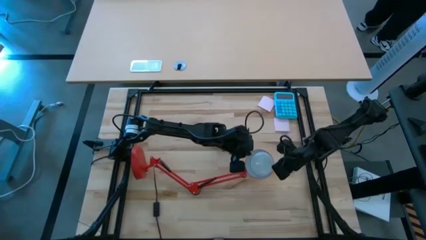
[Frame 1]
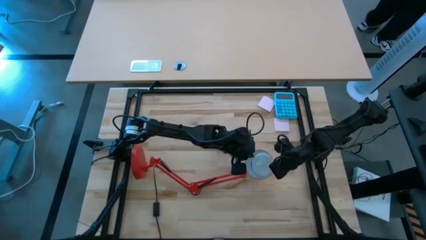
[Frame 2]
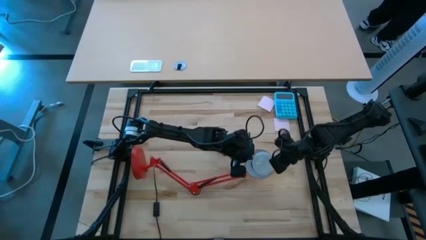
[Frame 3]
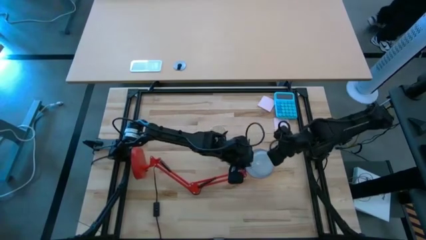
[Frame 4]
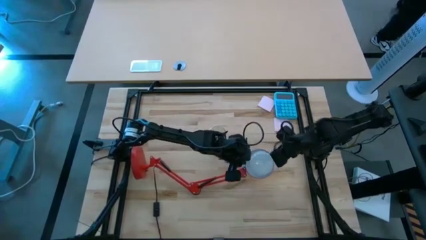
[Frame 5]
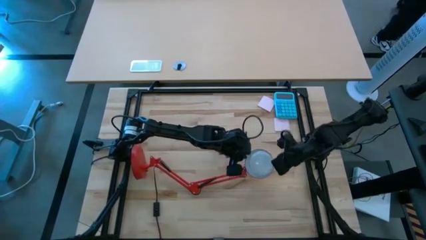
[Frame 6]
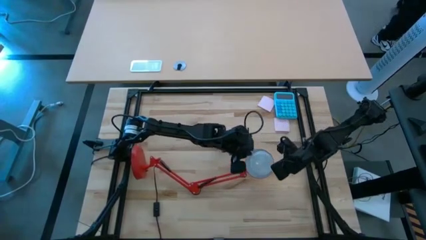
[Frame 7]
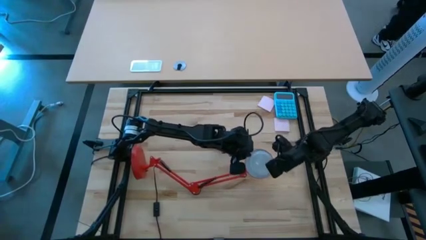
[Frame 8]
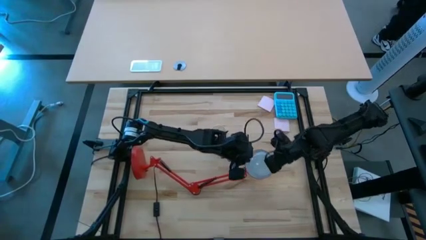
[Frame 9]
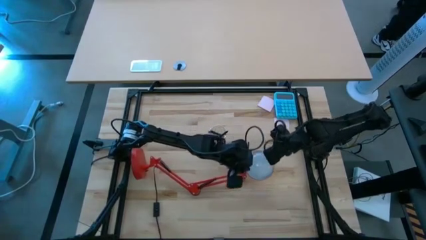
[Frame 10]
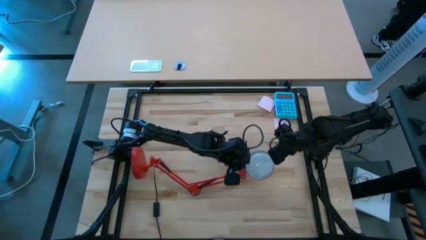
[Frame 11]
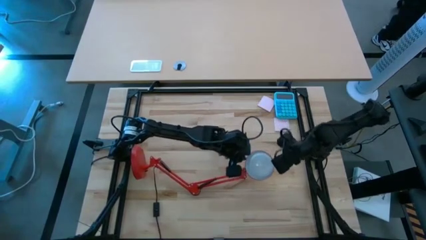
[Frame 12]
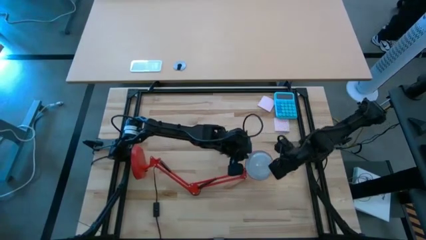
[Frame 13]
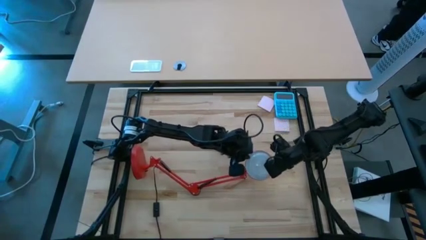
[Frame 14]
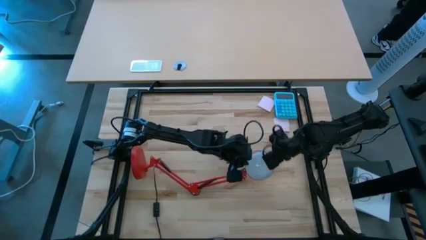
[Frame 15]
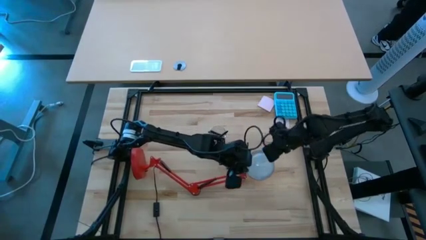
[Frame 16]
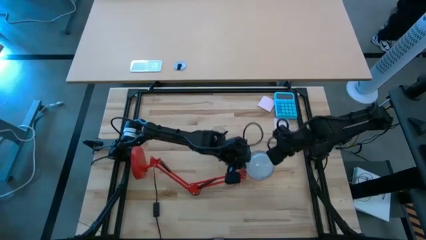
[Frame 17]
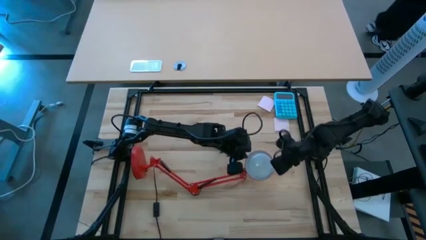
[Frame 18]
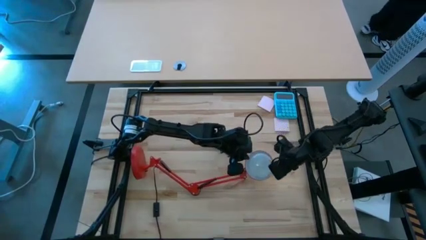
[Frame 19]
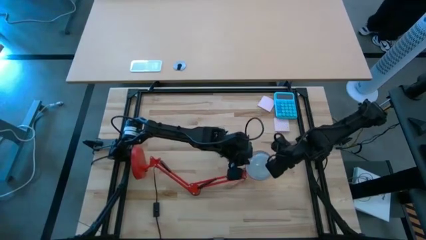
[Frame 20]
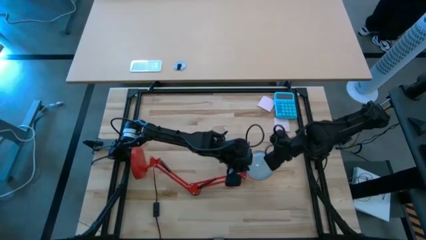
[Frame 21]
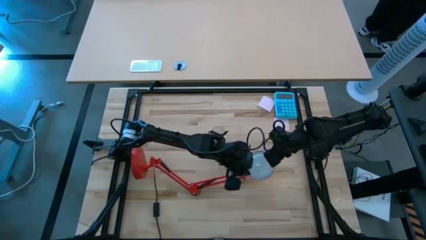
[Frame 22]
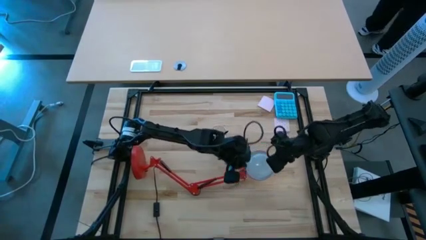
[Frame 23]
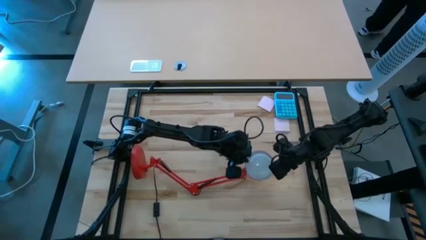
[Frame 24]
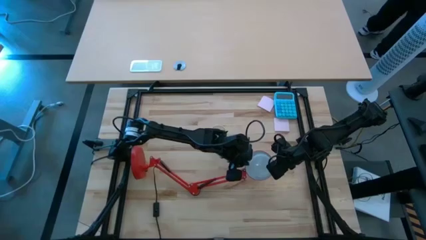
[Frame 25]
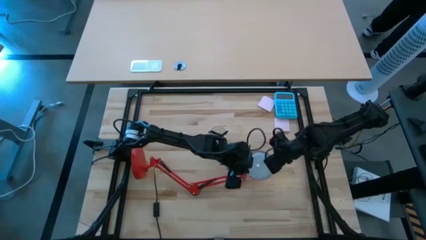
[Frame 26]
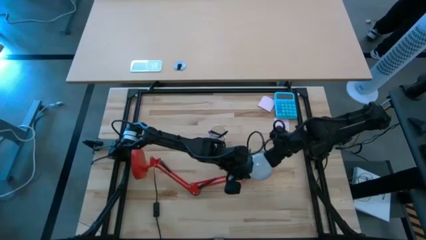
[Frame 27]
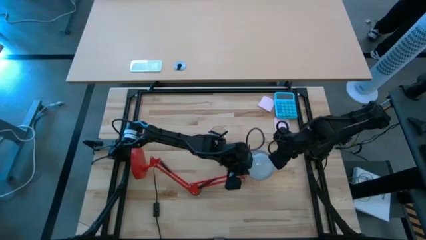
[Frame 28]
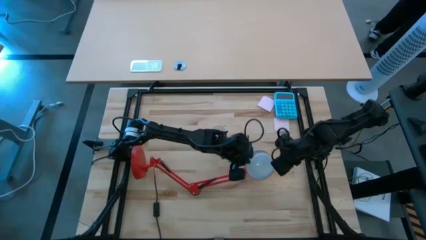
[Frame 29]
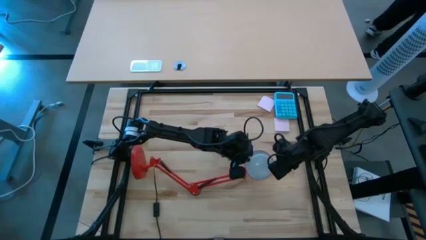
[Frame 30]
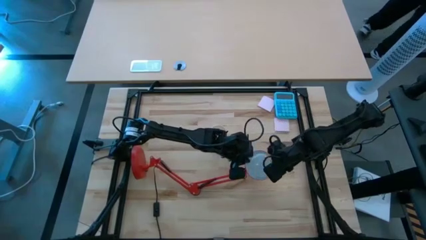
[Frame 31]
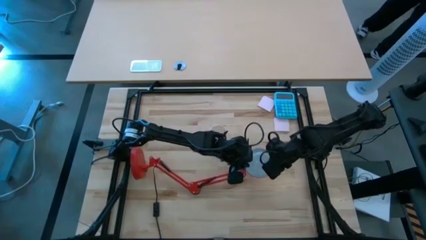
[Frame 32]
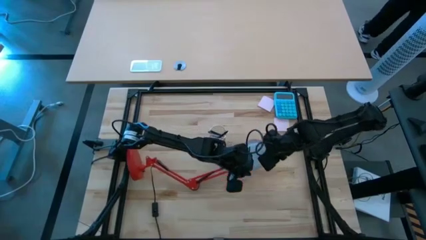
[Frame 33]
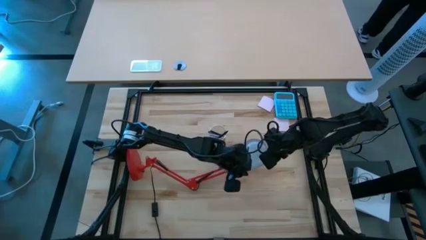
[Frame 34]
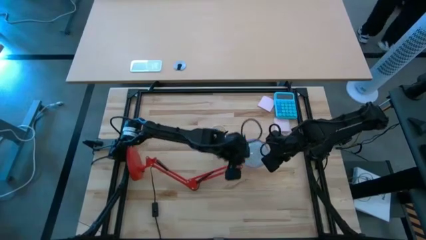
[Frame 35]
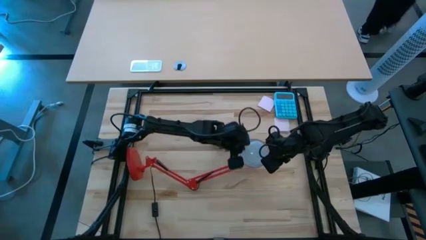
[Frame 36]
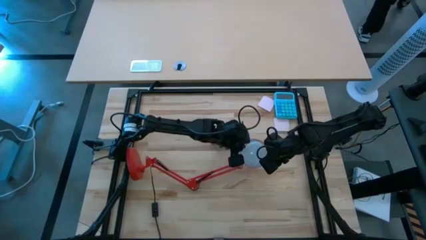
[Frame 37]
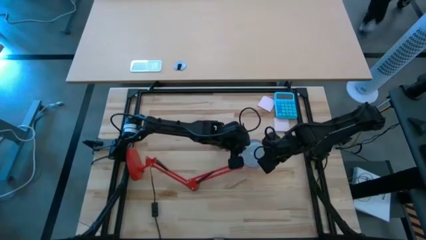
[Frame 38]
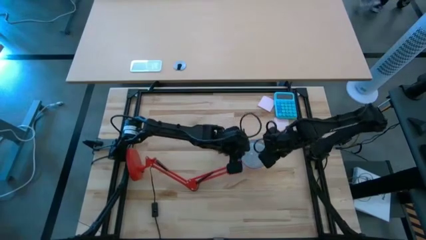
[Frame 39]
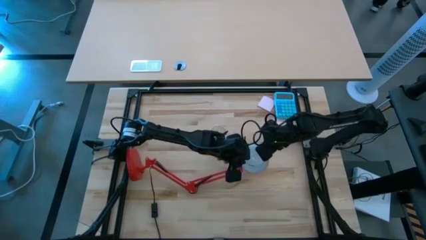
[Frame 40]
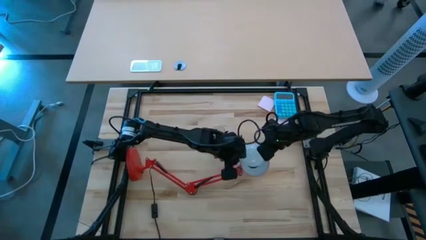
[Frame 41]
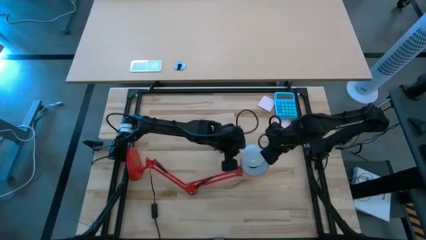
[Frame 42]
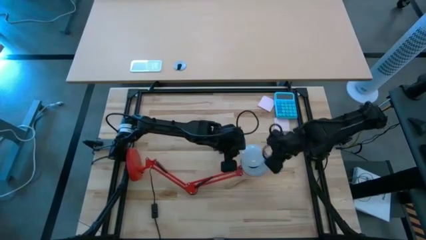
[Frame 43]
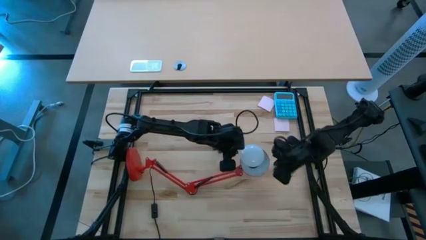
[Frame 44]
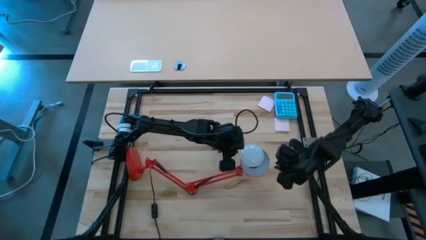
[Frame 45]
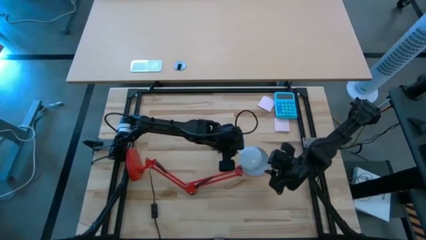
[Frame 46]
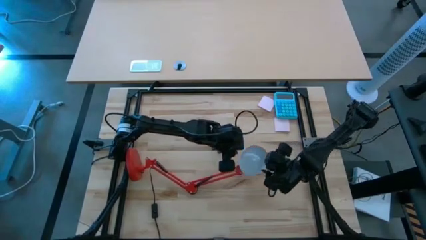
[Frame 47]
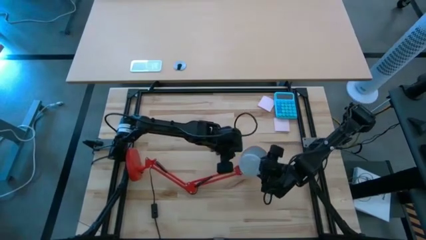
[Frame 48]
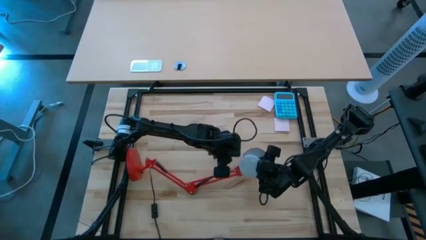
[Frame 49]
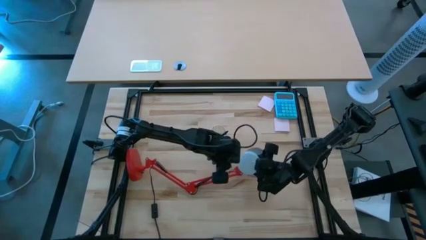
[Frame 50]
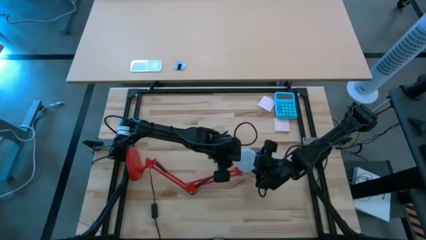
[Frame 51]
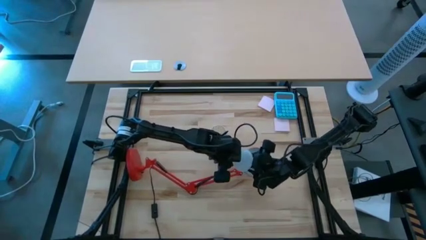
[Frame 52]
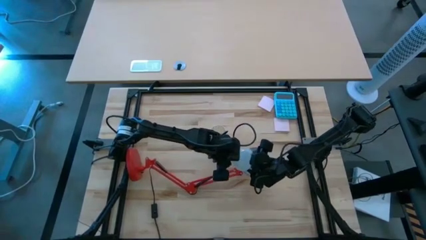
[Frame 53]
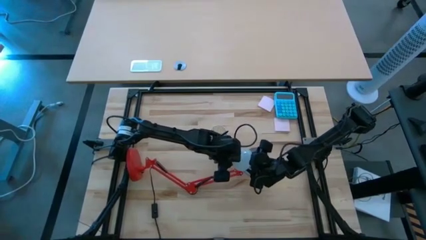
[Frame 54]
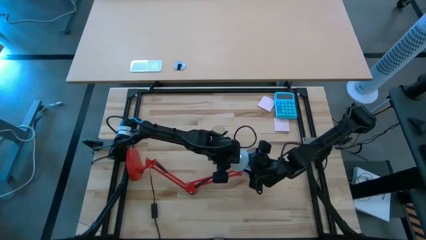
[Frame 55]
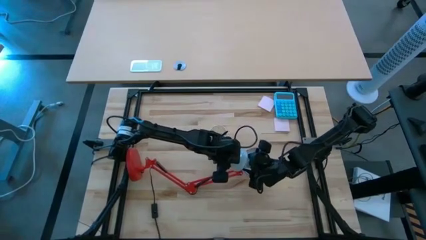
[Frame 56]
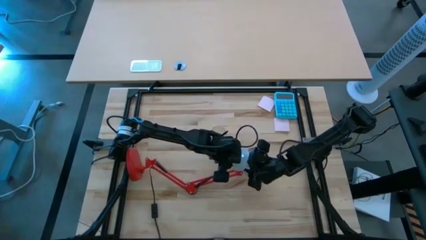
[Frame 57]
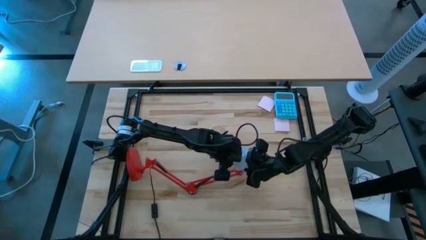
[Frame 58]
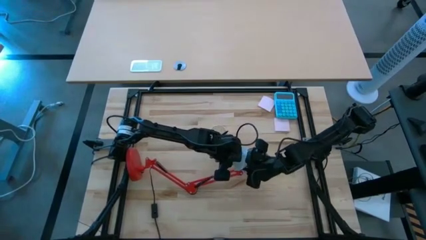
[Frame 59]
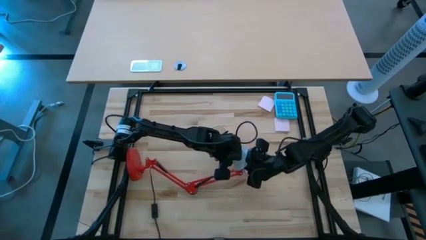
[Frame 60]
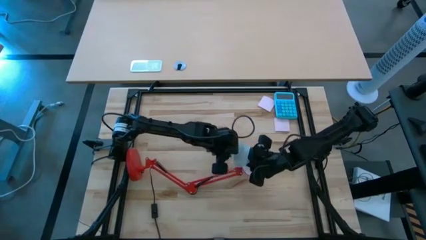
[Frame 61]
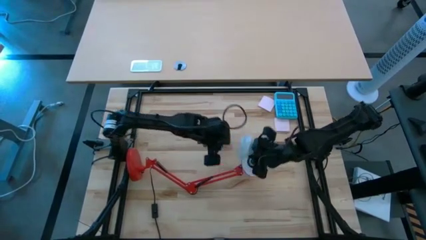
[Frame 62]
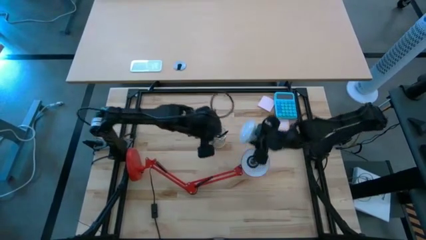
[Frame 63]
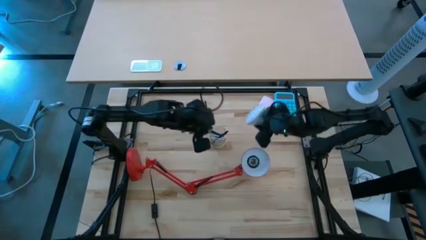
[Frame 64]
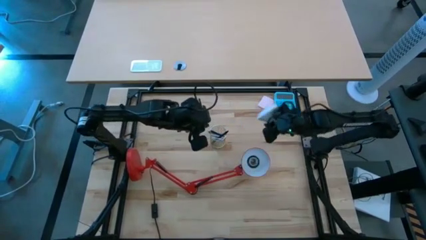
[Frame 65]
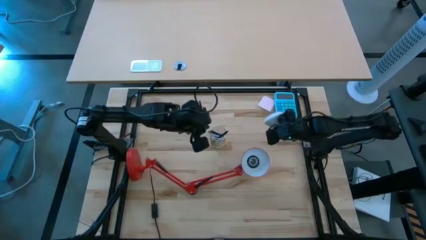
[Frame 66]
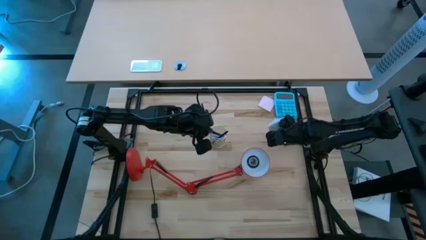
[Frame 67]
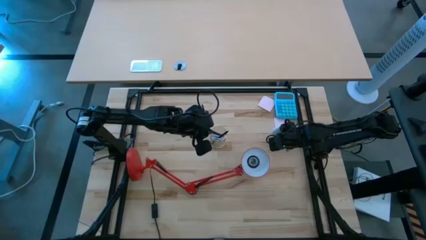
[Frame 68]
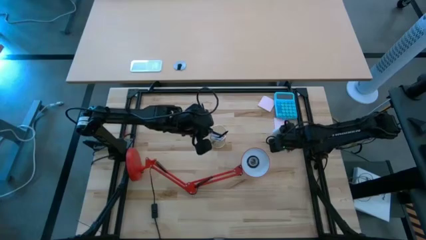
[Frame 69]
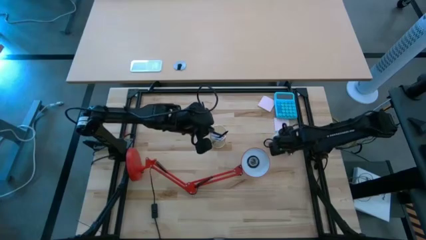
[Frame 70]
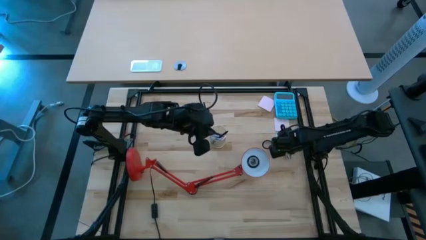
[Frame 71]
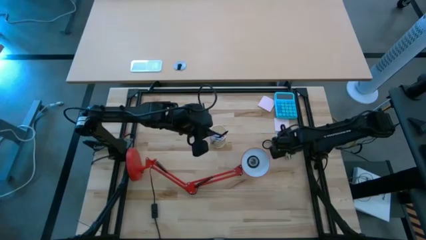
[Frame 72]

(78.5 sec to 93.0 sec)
Task: Screw lightbulb
Remove the light bulb from the lamp

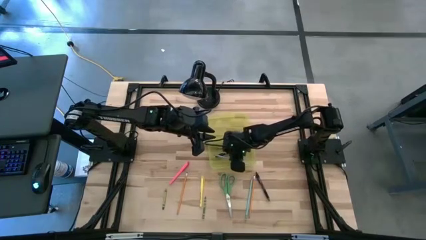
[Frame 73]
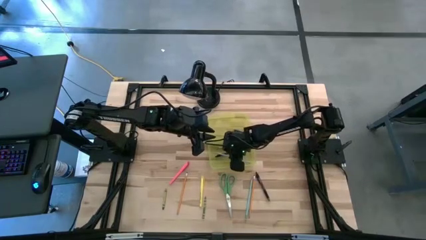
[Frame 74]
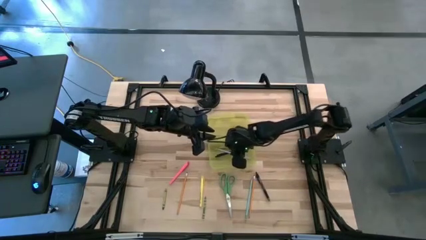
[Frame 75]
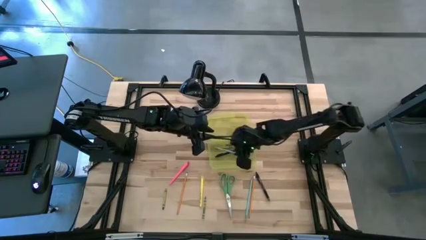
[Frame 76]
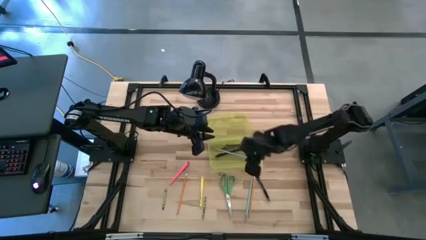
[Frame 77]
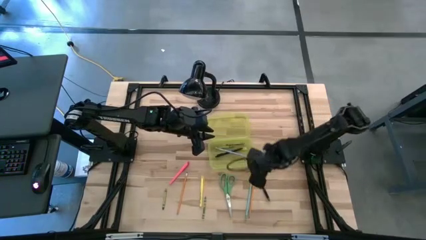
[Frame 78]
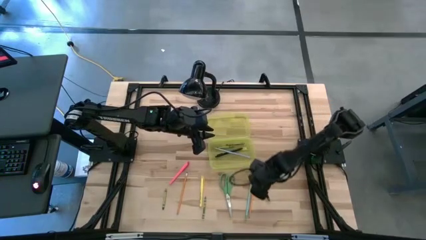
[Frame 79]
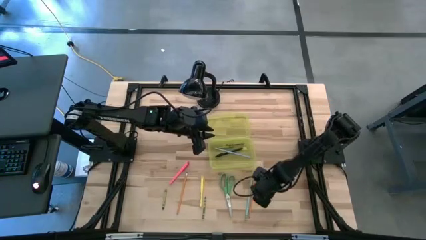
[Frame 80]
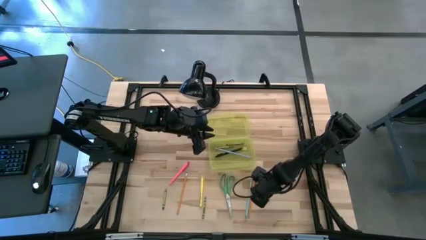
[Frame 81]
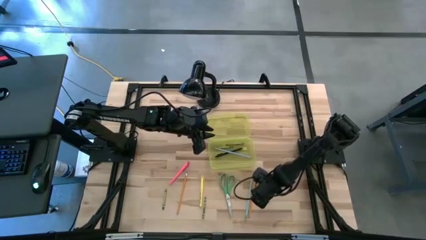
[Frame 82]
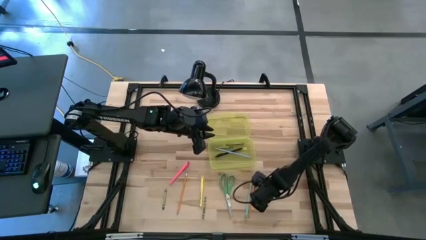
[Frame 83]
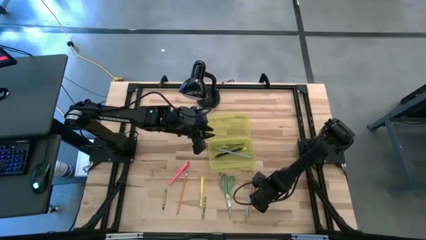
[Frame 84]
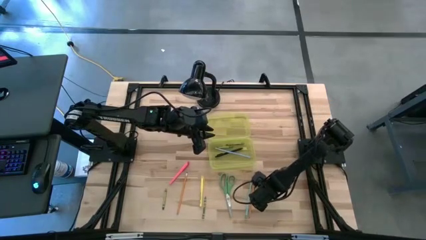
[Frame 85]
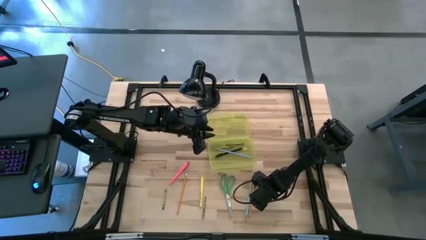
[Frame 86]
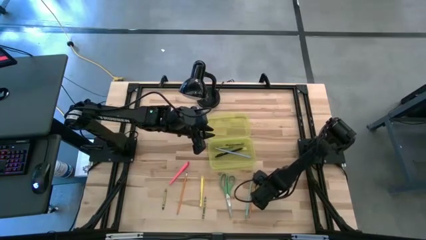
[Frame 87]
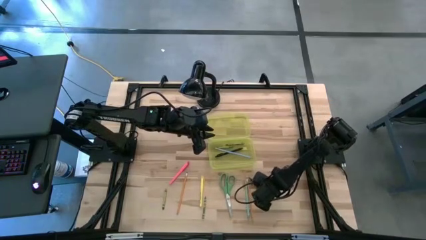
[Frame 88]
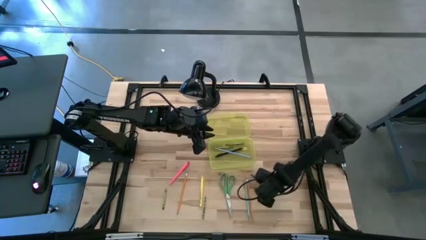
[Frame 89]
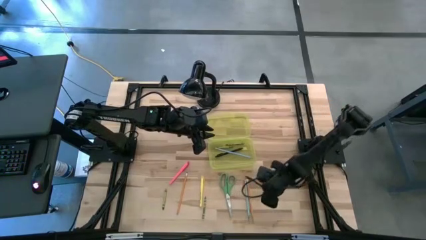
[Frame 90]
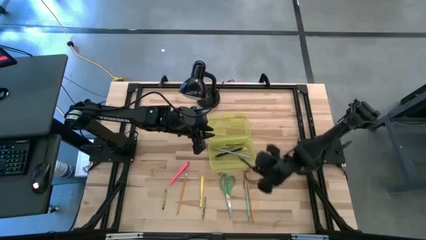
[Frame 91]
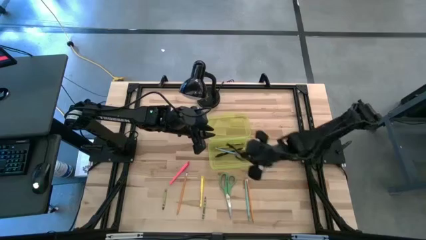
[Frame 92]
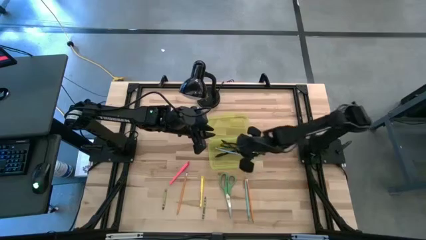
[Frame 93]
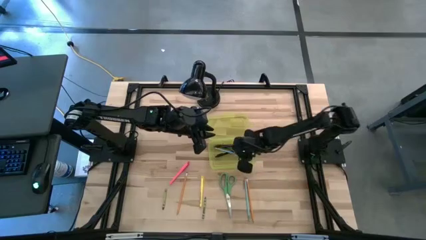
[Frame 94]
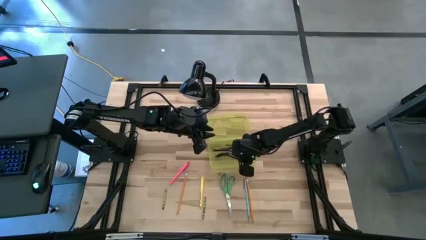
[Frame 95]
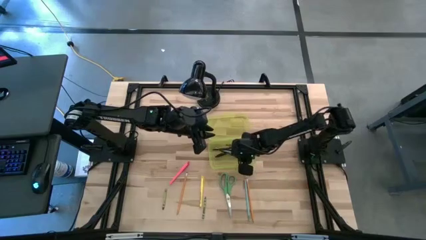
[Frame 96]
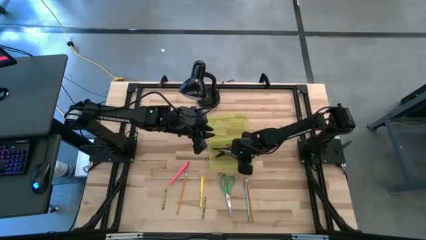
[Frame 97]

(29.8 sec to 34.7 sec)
Task: Pick & place school supplies into a supply box
Put the black transparent pen into the yellow supply box
